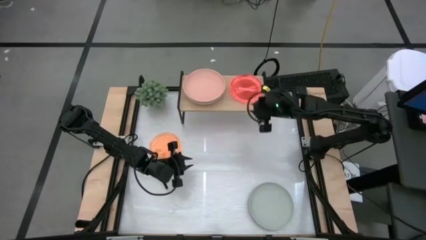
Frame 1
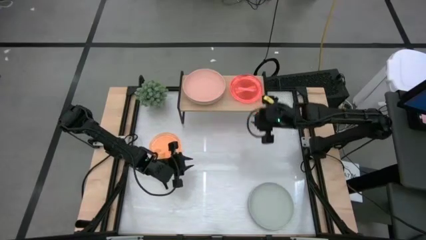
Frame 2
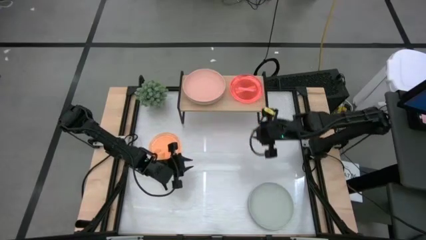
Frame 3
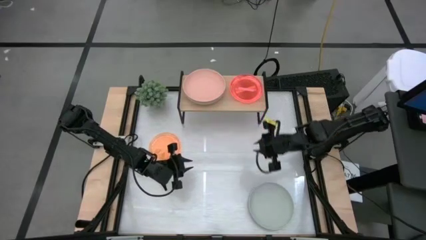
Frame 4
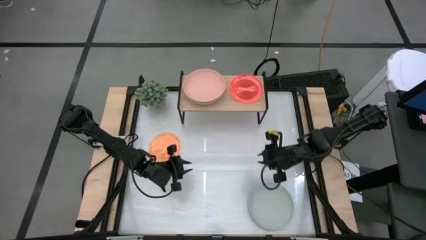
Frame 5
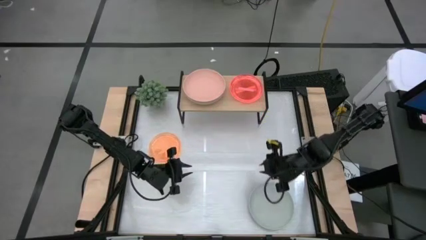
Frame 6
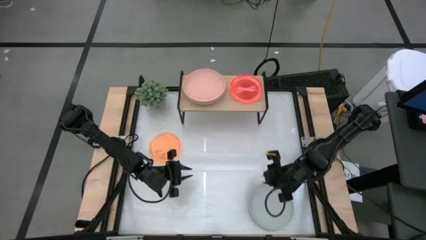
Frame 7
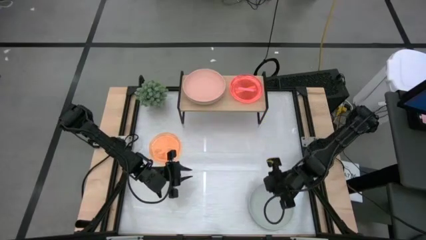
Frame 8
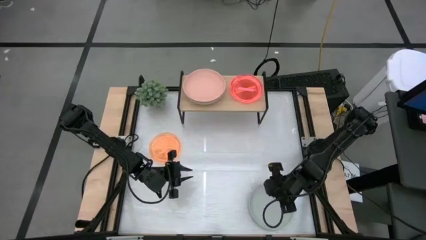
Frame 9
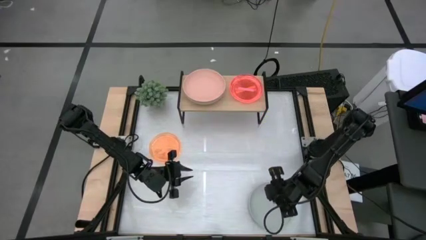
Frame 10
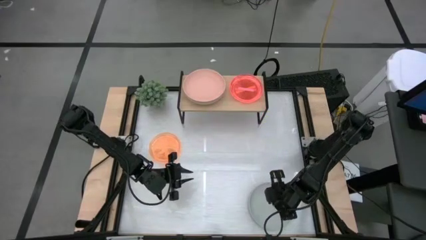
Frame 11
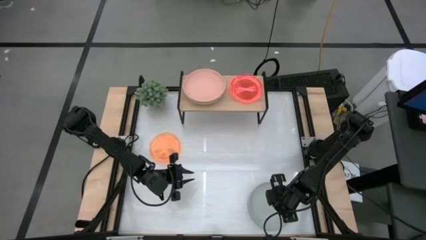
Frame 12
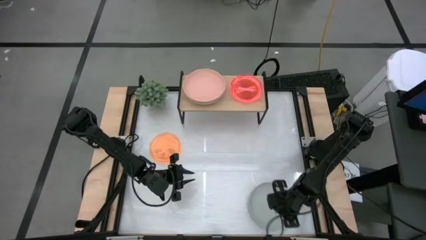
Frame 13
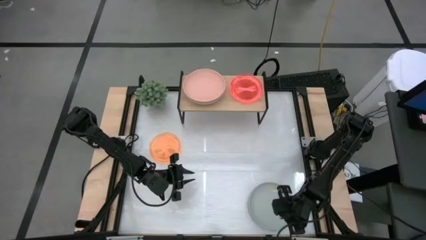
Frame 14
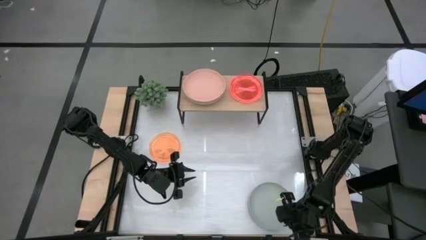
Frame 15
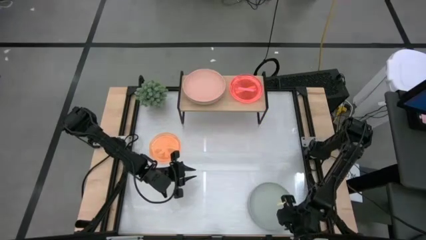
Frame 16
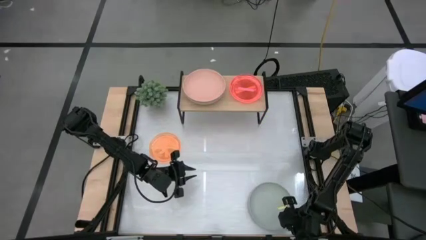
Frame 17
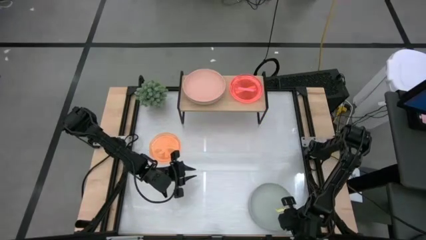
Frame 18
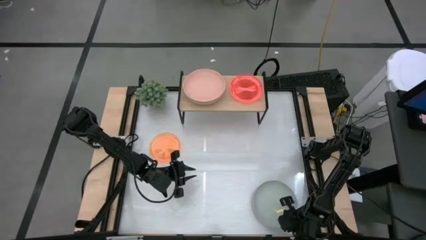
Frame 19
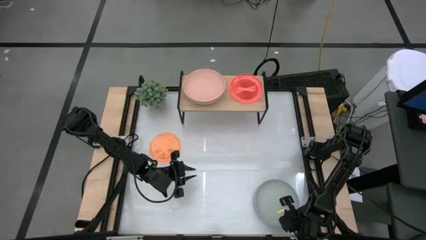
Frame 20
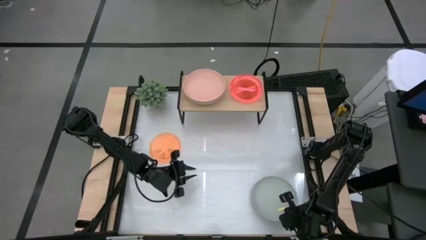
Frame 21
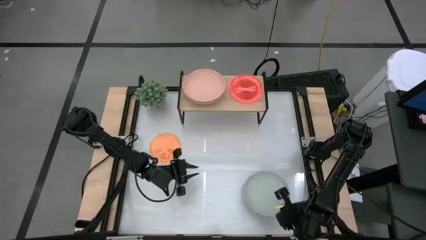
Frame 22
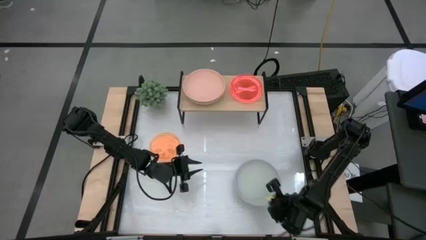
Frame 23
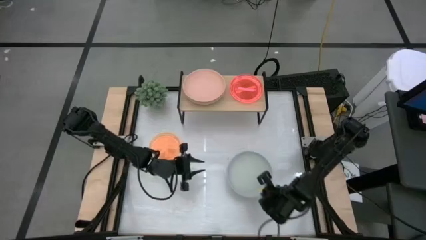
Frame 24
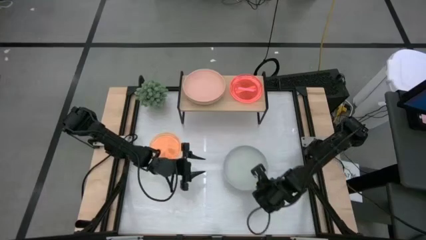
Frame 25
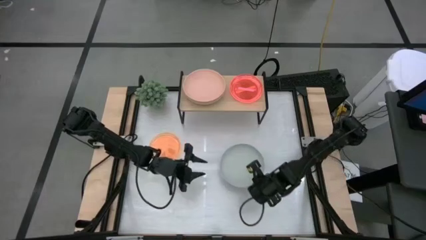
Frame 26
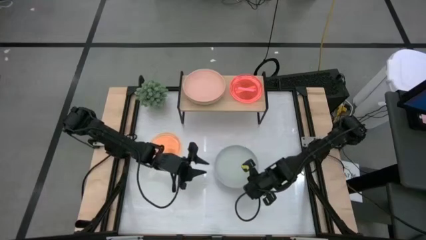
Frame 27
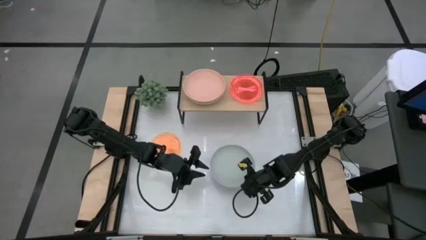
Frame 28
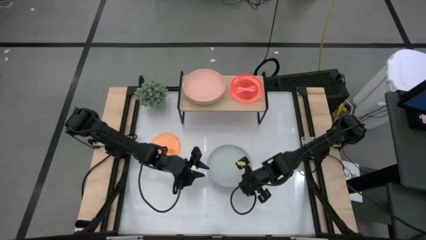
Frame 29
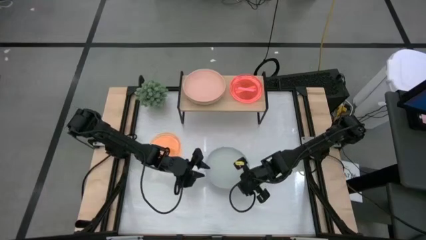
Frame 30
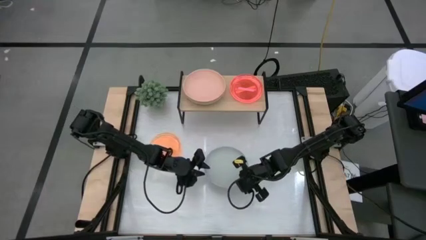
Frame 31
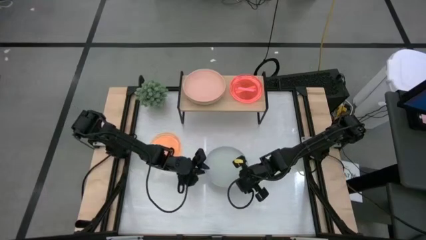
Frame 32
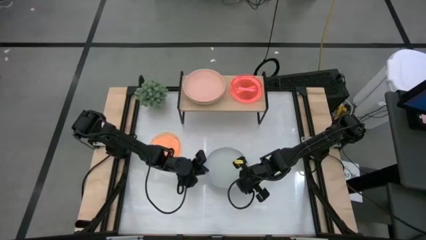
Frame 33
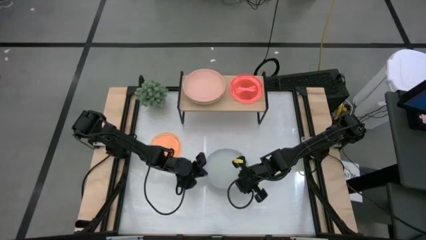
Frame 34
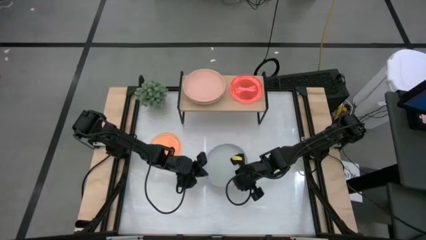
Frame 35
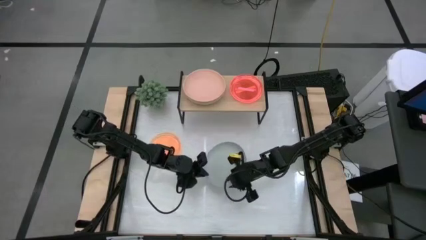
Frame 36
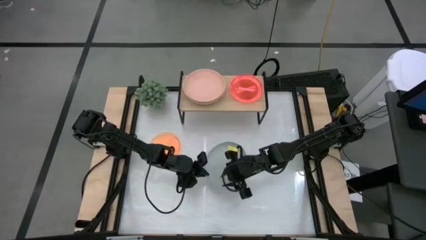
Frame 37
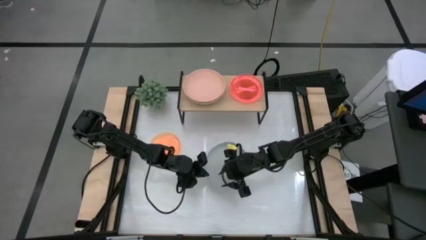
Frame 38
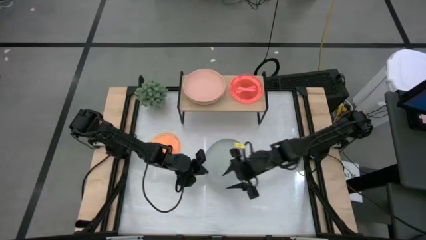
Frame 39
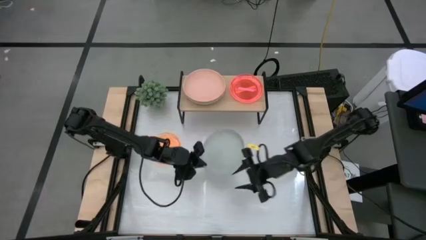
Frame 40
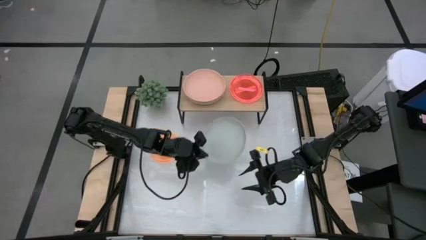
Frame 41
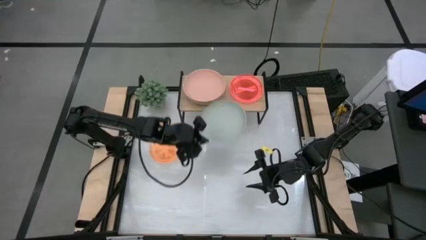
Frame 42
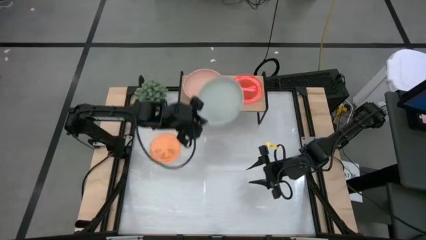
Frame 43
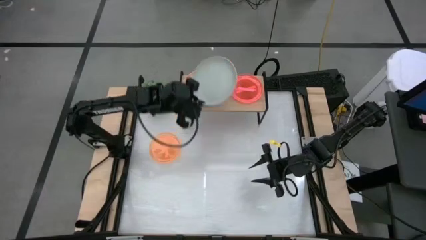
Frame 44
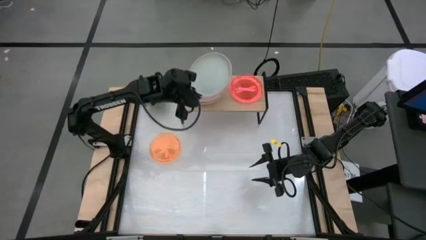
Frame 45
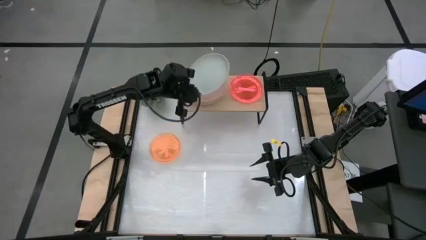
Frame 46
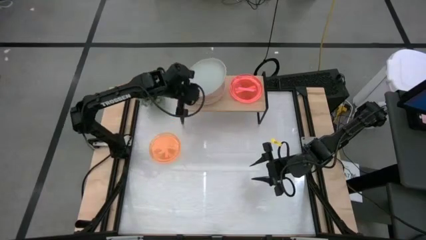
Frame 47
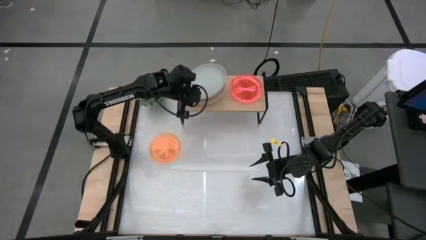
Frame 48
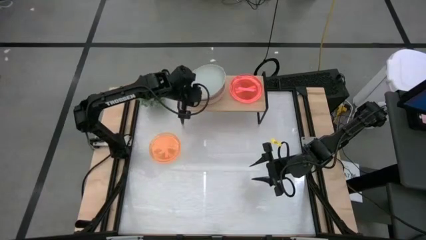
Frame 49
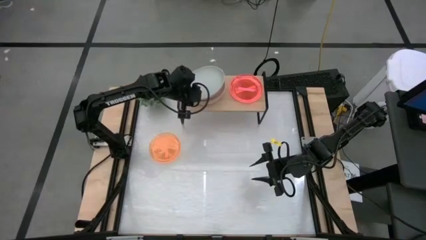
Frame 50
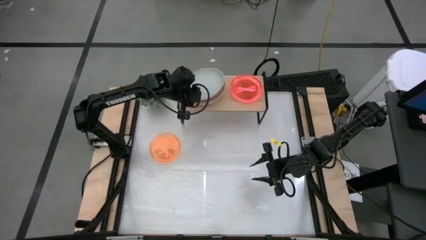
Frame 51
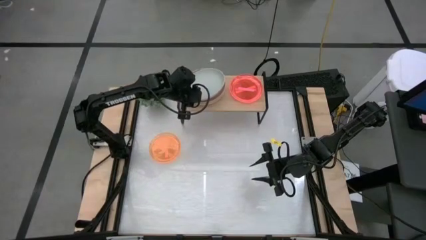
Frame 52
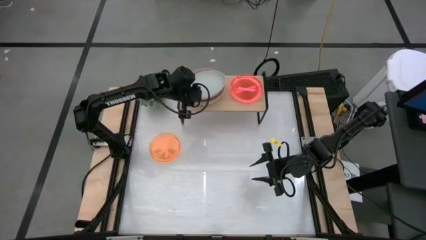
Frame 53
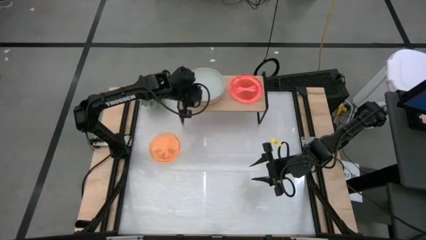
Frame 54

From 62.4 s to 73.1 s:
Task: Place and stack plates onto a shelf
Stack the gray plate on top of the light brown plate
